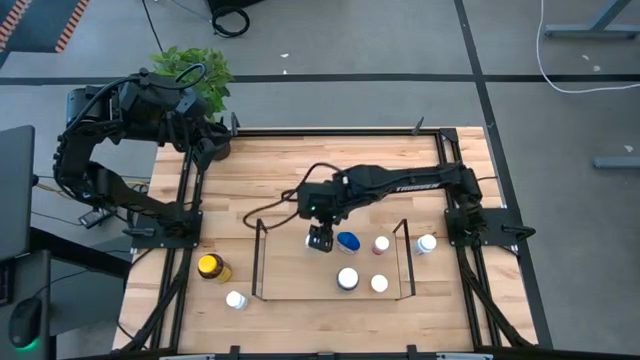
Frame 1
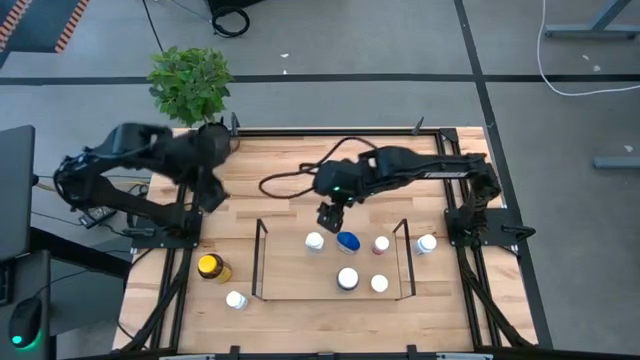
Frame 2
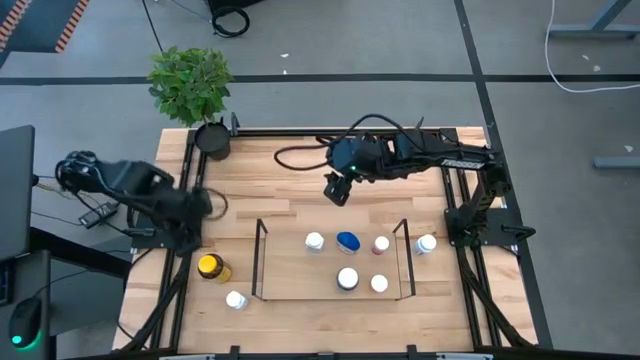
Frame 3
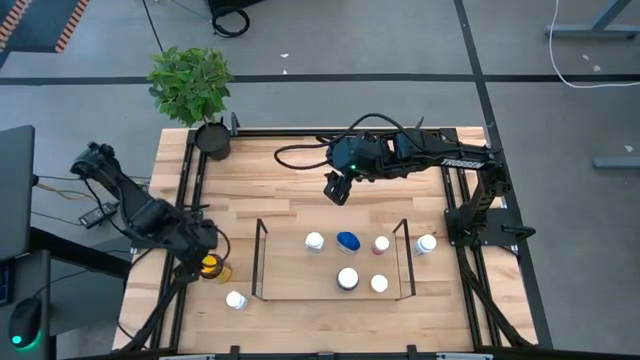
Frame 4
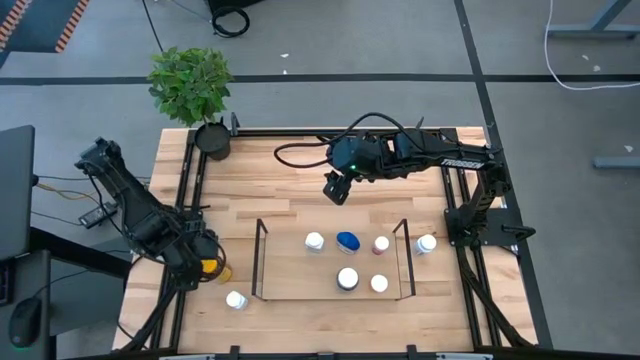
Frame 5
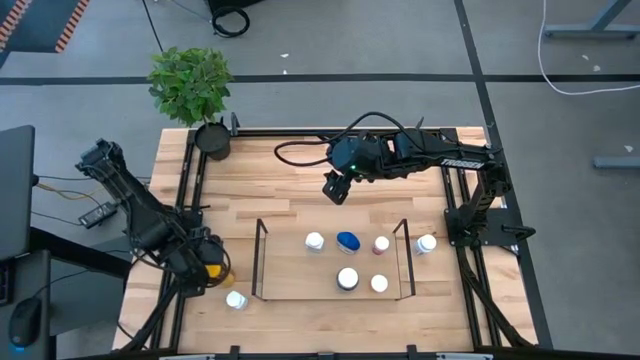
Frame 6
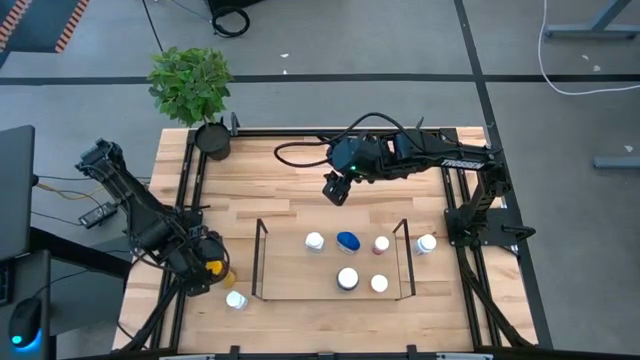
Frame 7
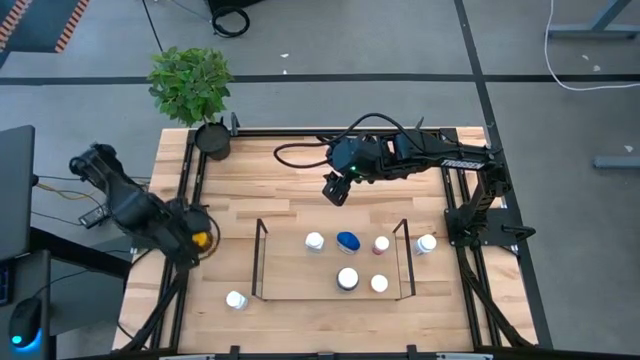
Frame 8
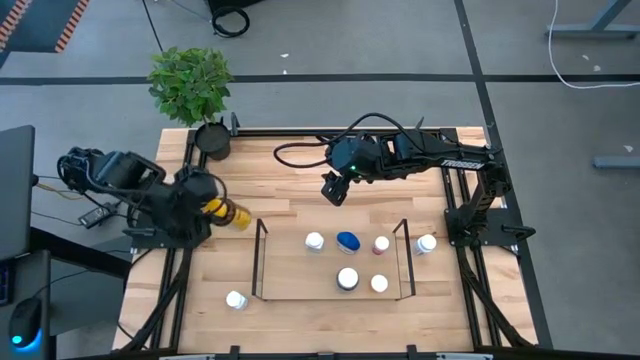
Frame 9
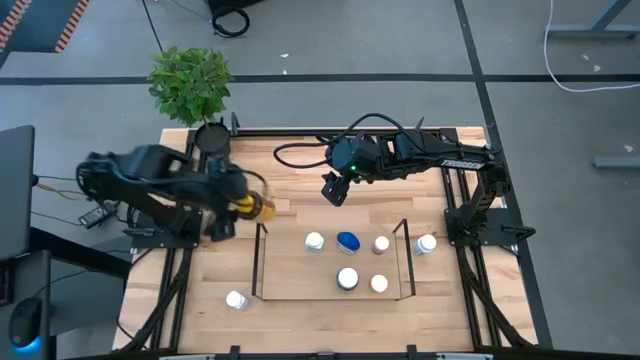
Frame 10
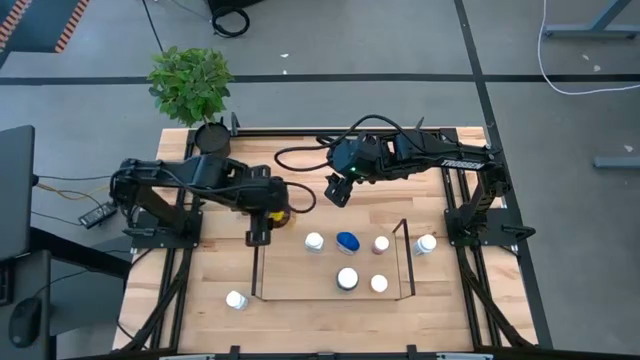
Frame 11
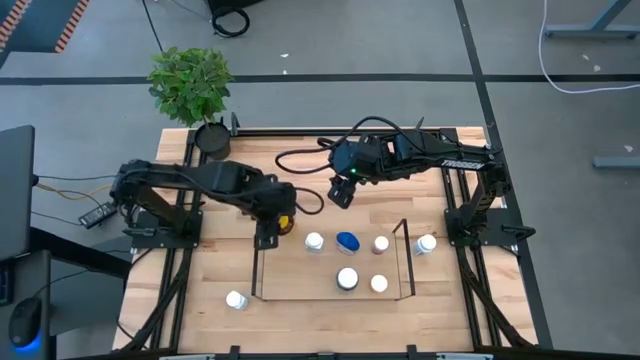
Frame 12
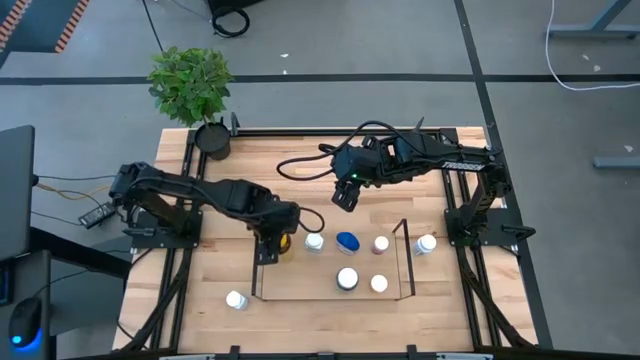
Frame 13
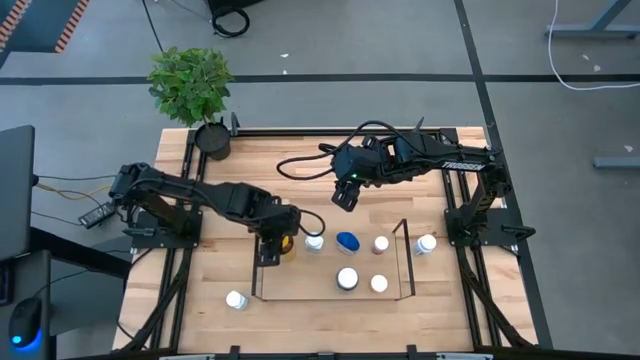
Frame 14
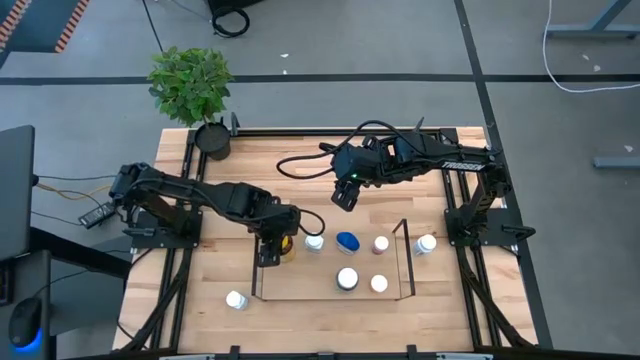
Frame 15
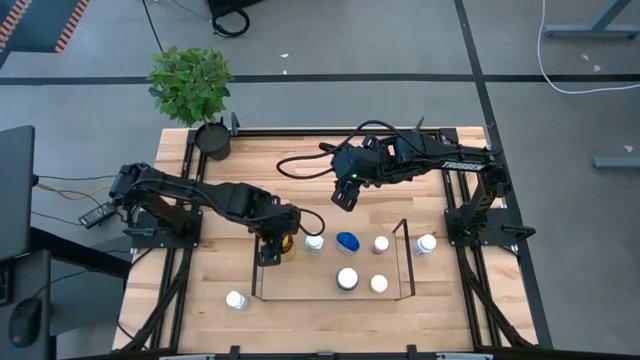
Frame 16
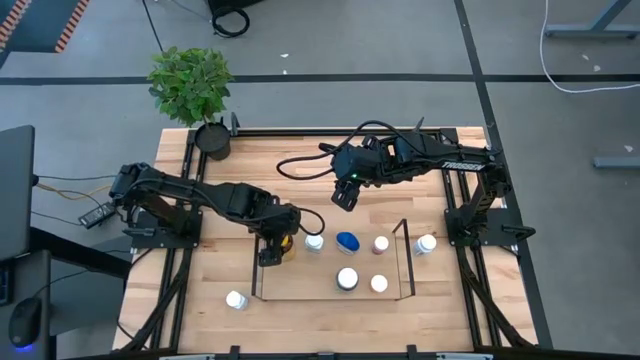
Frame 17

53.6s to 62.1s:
Task: Pick and place medicine bottles onto shelf by color
Put the yellow pill bottle on the shelf

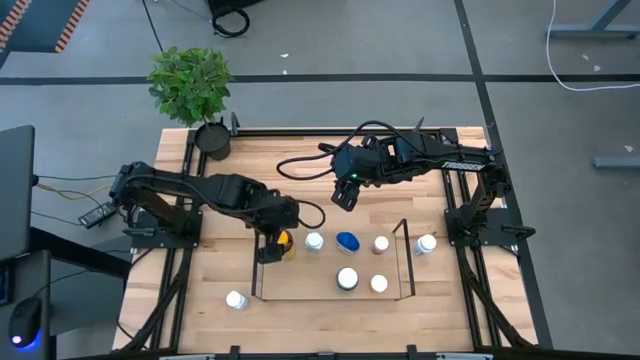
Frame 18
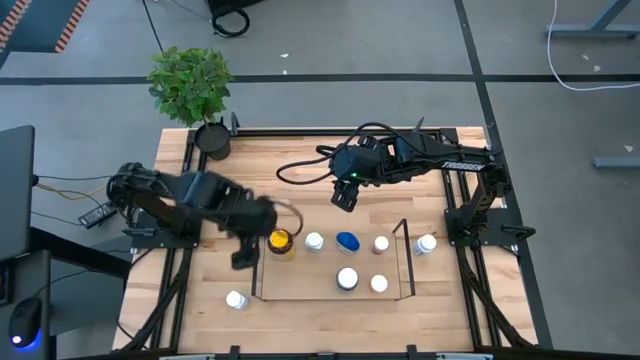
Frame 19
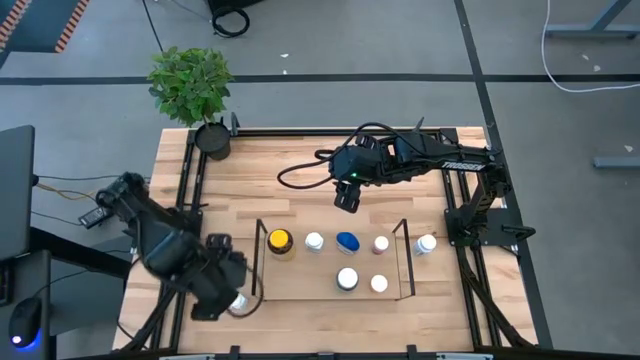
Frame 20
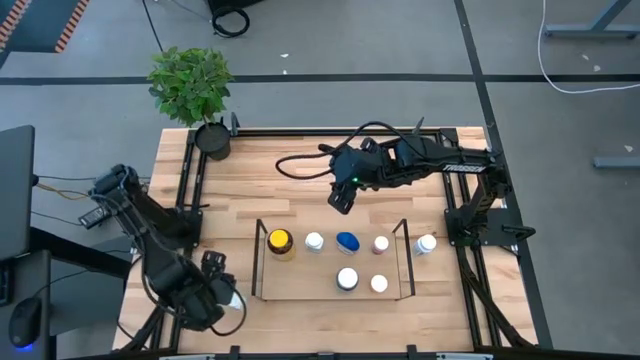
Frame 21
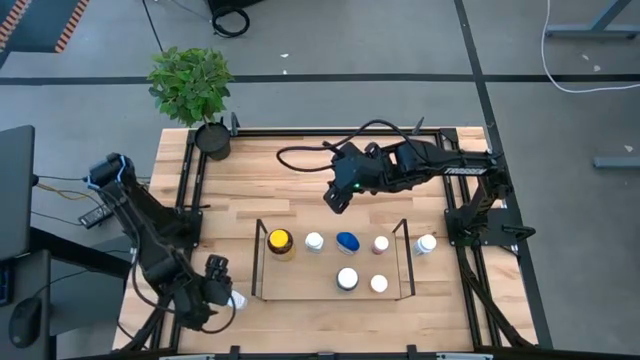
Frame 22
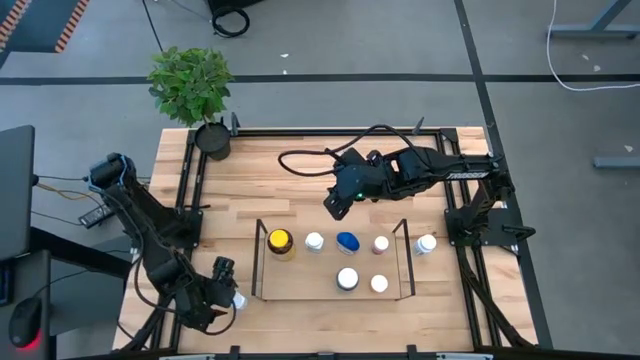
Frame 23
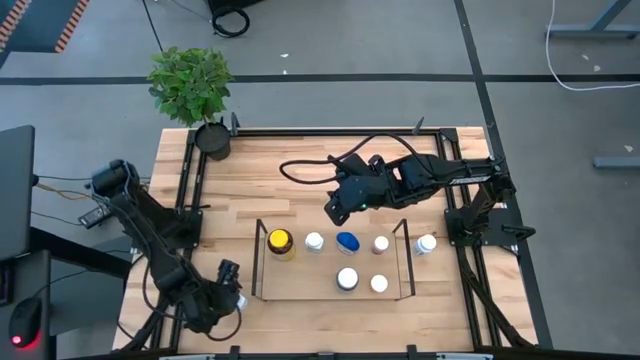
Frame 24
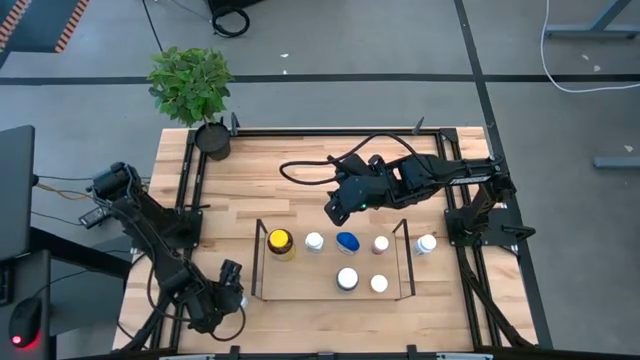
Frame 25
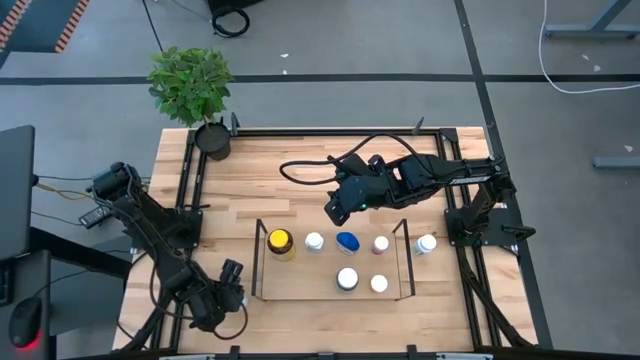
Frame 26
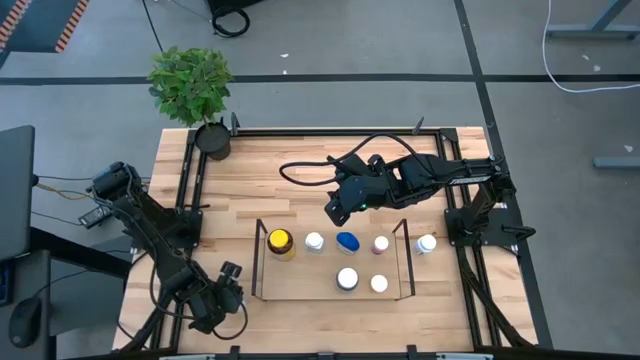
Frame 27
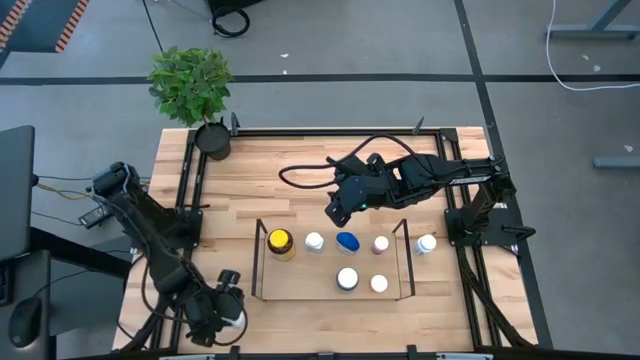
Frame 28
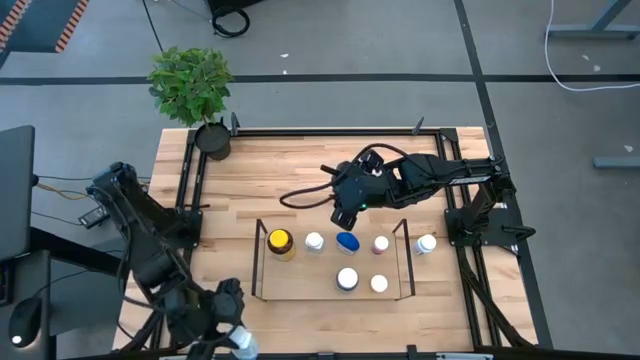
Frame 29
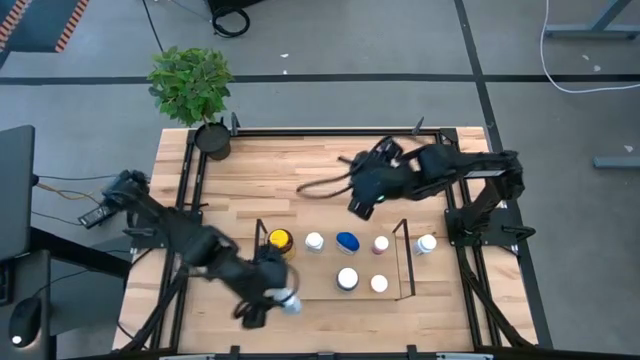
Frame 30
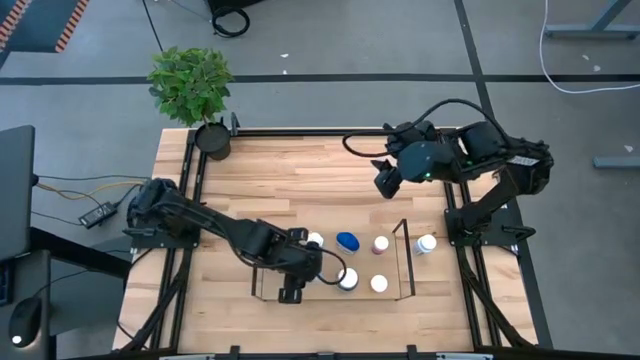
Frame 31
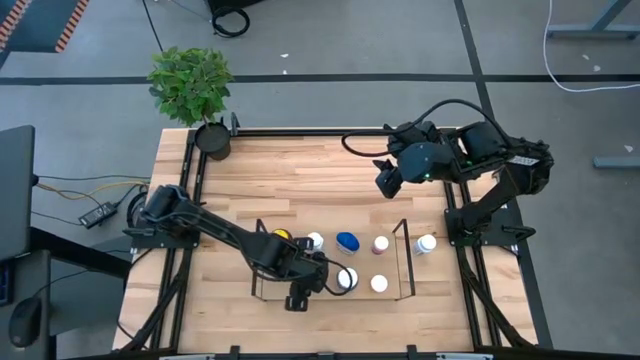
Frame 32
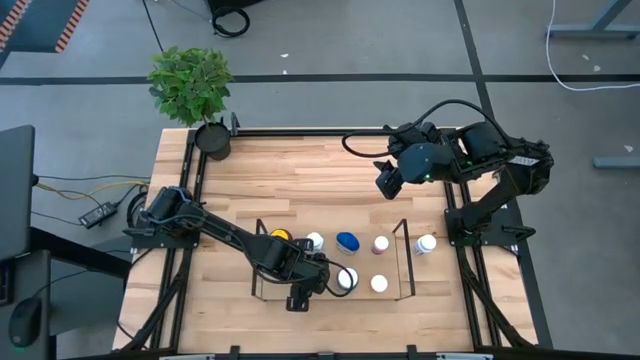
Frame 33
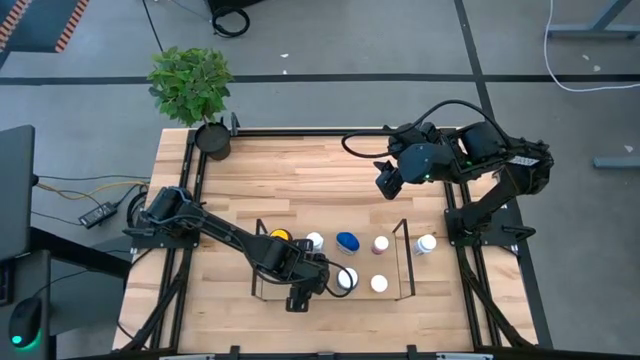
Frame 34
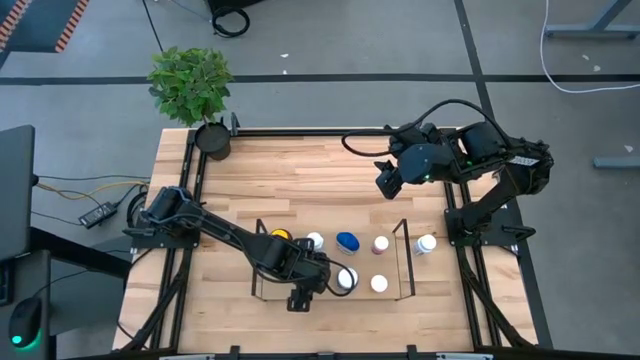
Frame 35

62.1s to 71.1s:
Align the blue patterned pill bottle with the other blue patterned pill bottle on the shelf

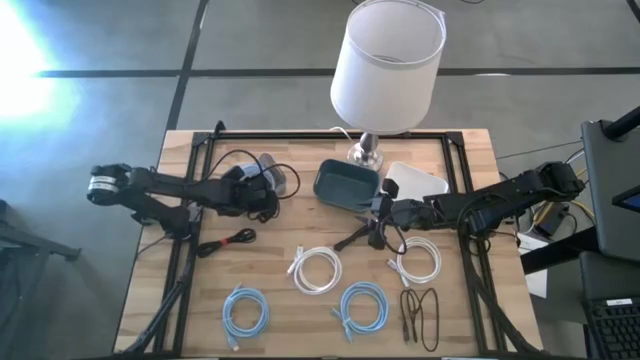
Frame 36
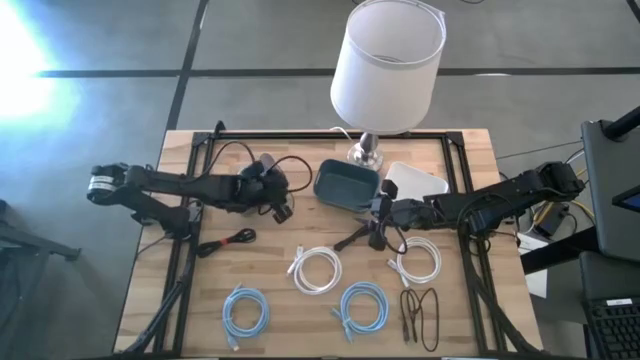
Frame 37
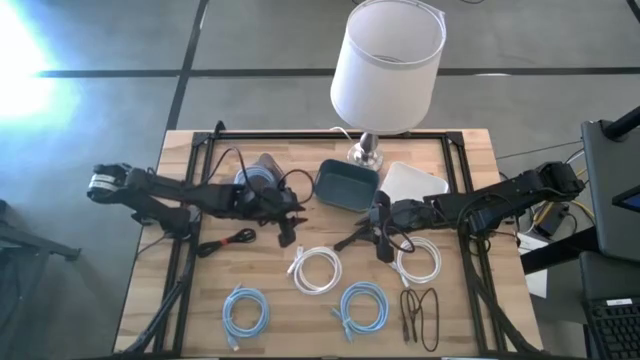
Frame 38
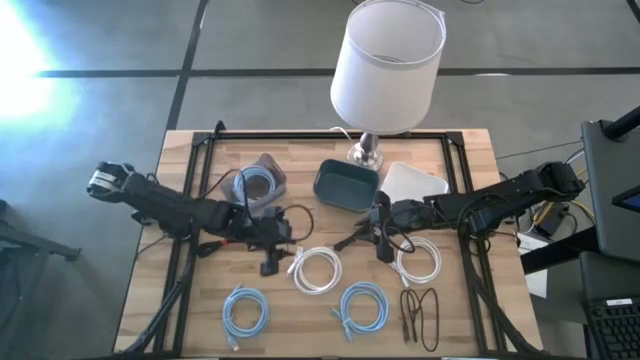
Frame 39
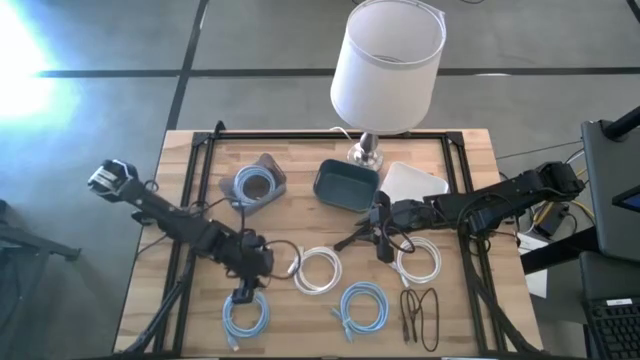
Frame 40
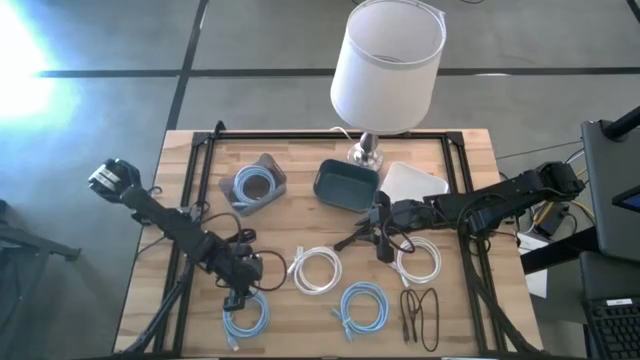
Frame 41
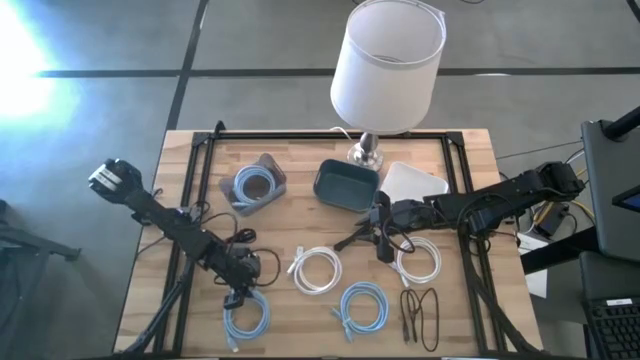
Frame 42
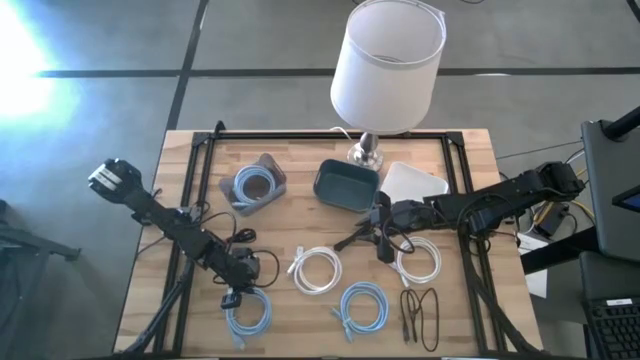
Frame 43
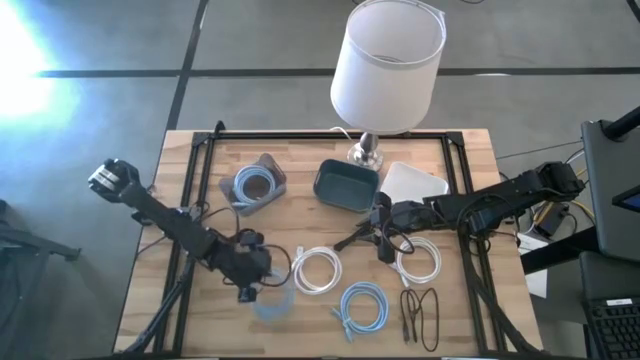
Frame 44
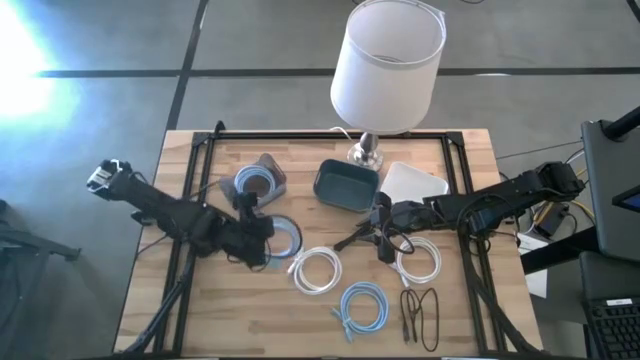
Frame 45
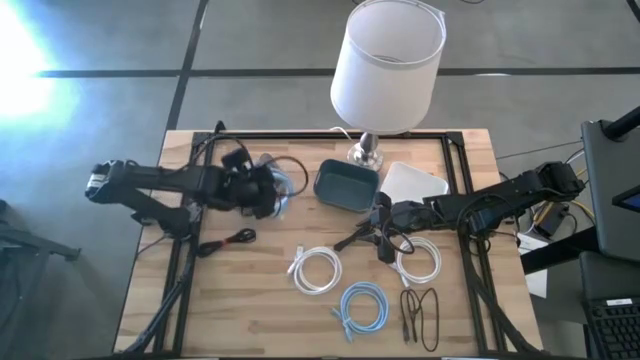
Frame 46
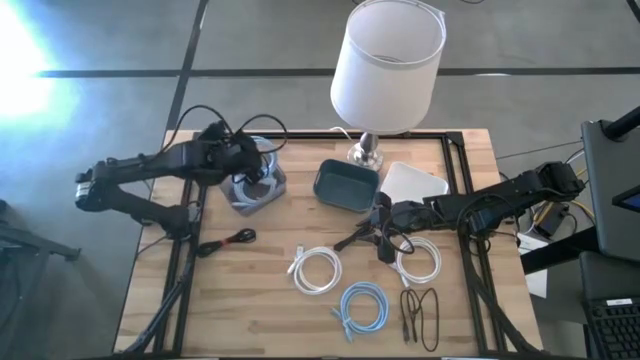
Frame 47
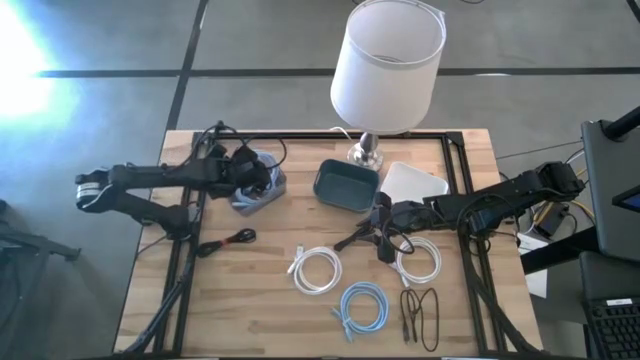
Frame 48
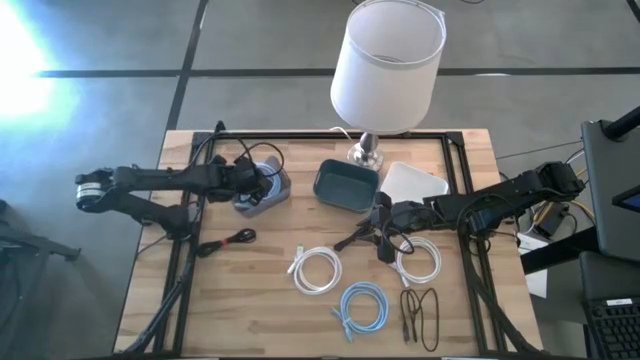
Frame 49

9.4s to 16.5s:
Task: Pick & Place USB Port
Put the left blue HDMI cable into the black bin
